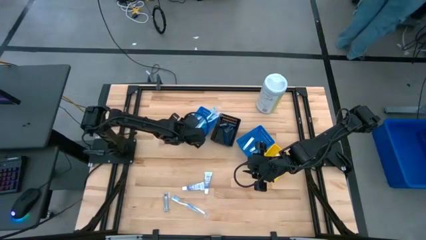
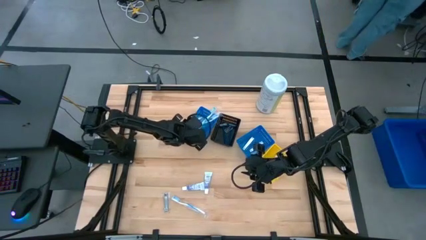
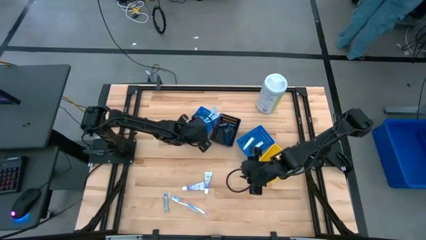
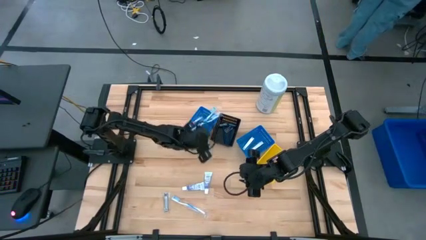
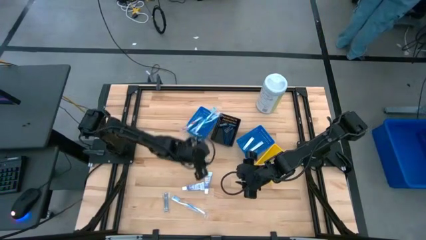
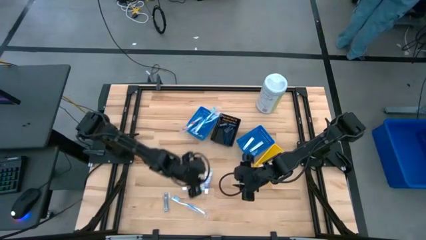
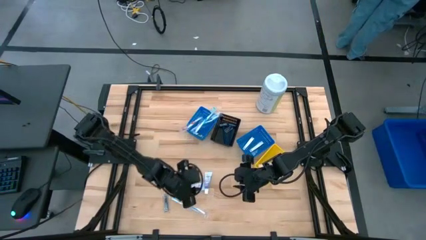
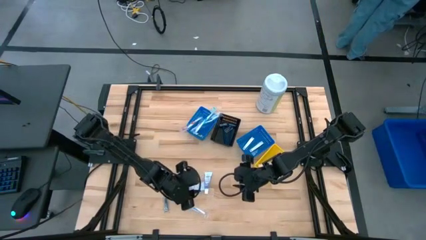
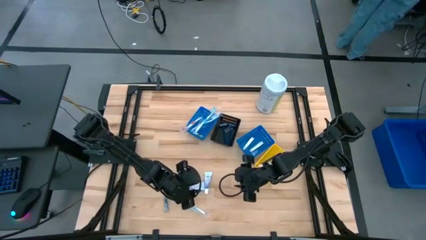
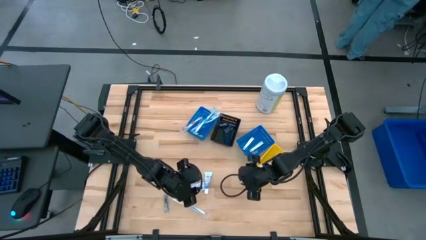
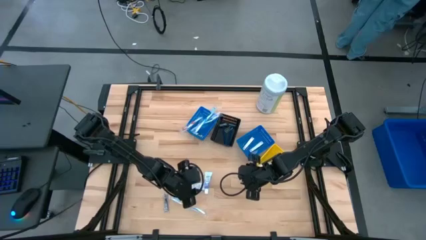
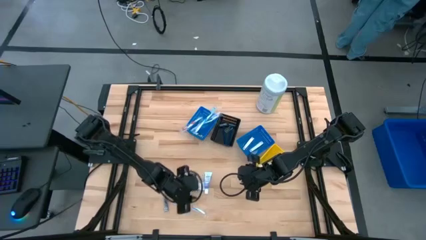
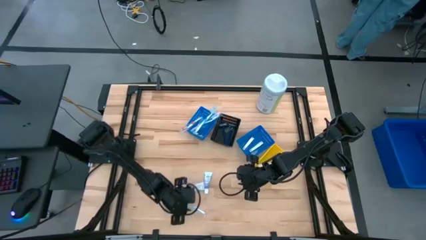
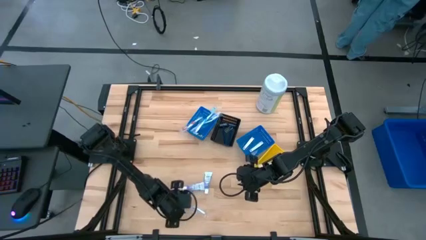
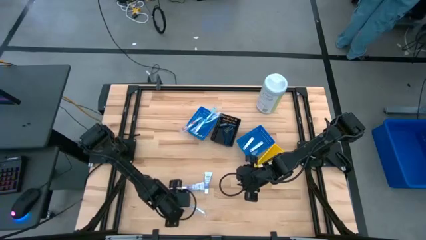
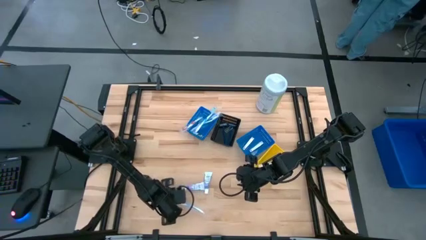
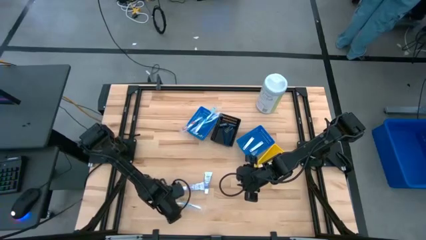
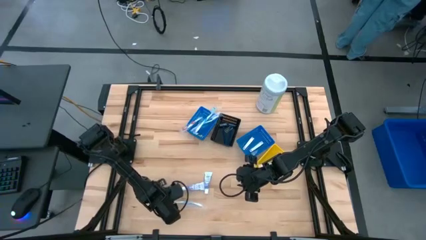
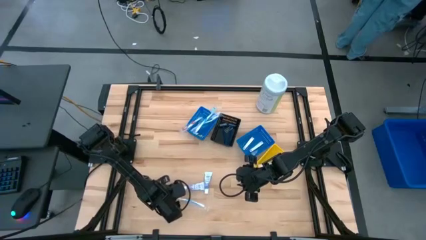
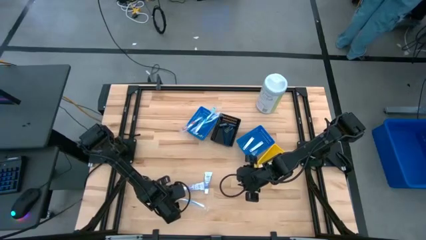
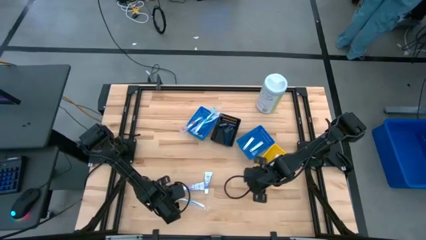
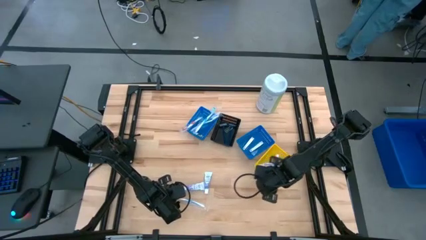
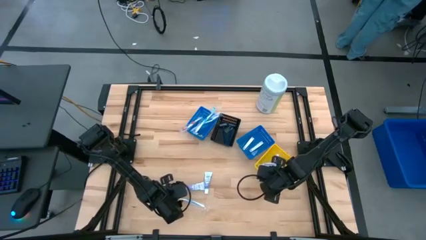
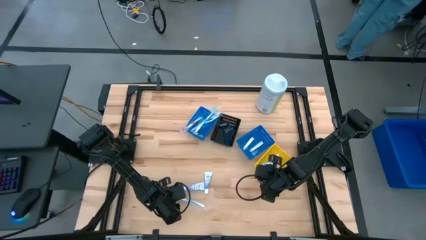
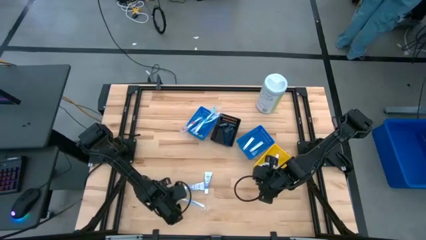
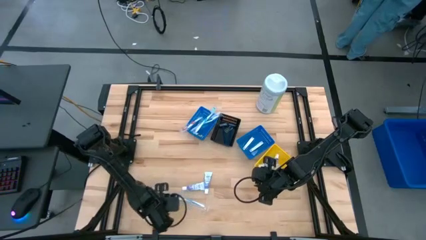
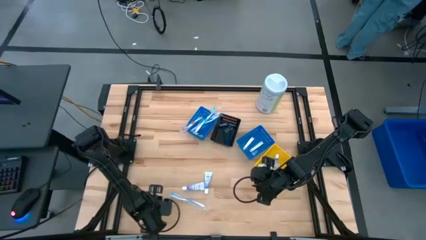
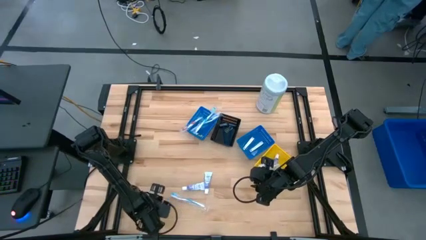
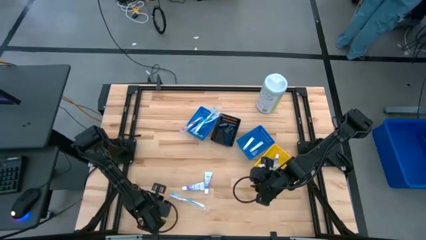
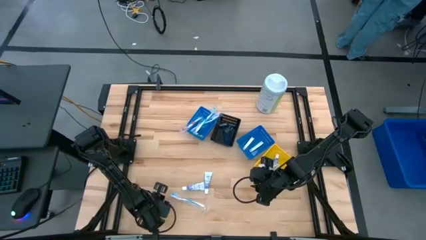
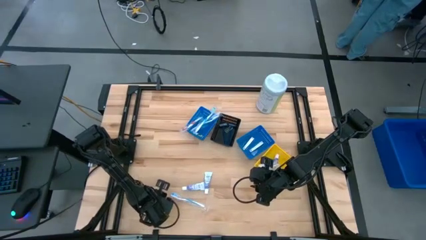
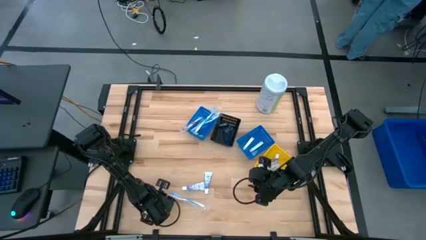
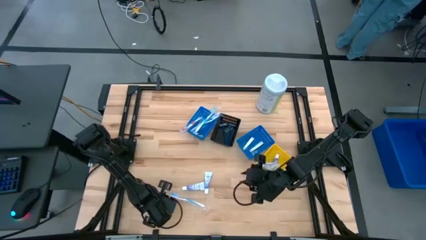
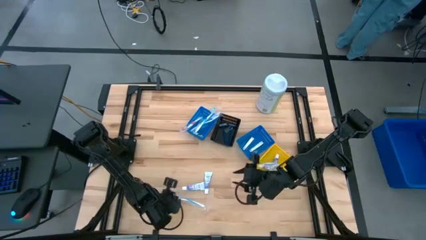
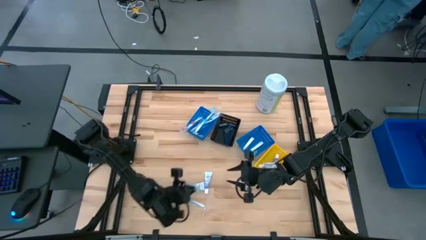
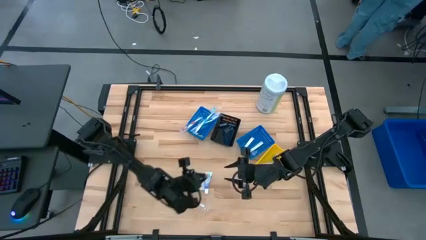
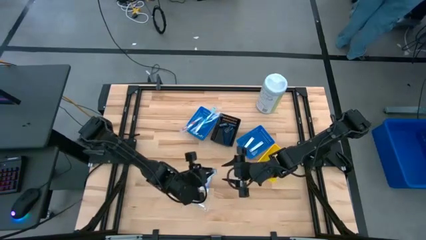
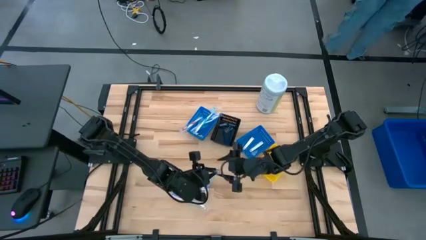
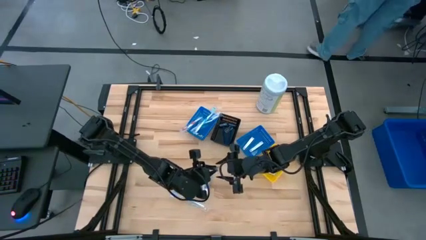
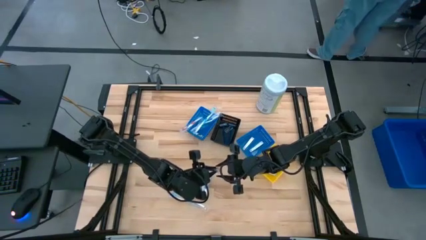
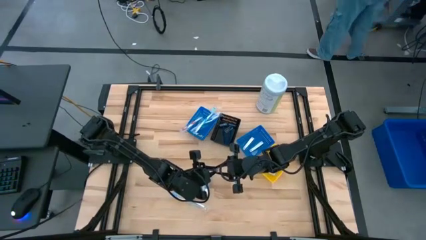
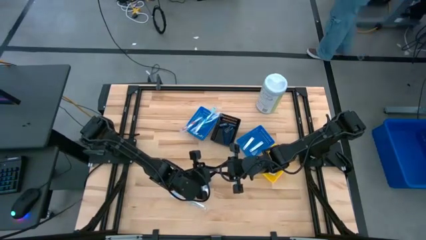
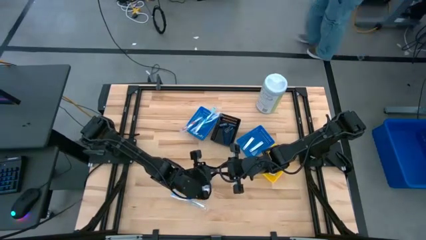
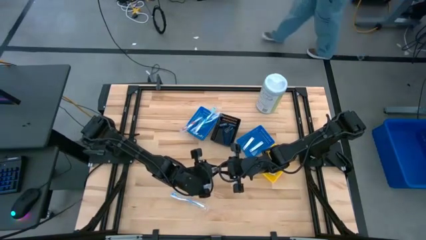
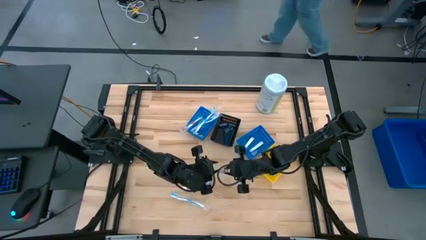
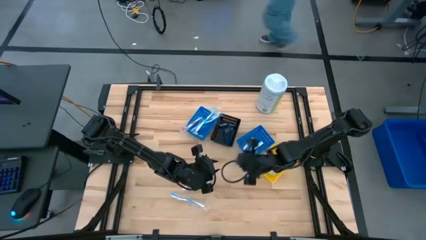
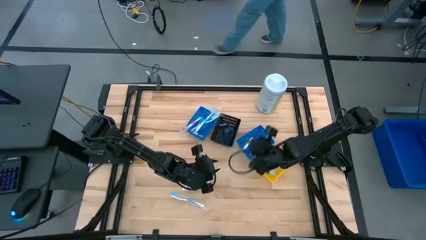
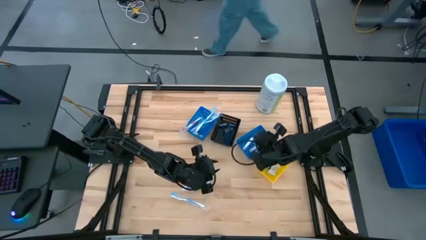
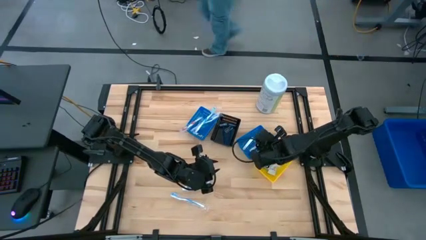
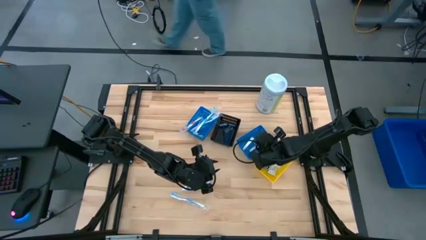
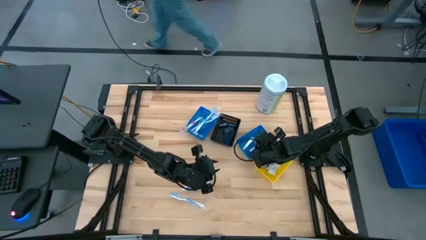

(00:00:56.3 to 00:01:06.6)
Task: Pick & Place Travel size toiletries
Put the nail cutter into the right blue basket

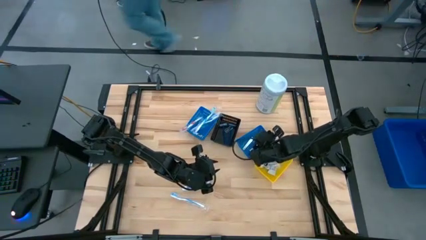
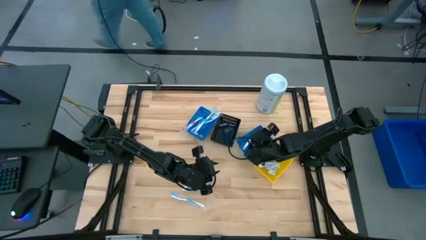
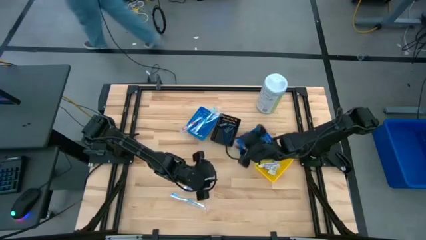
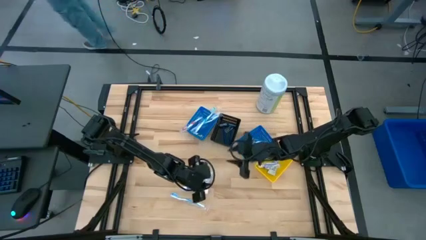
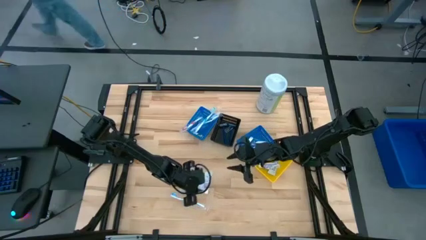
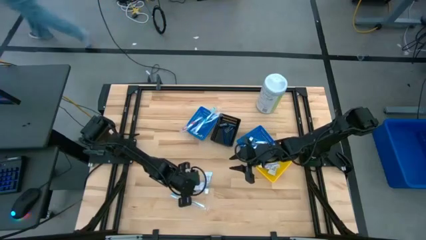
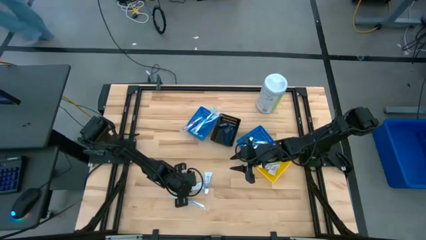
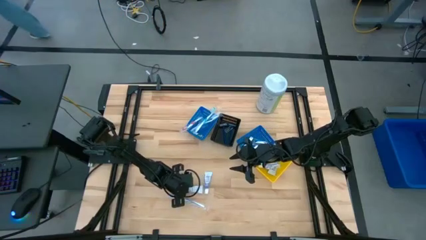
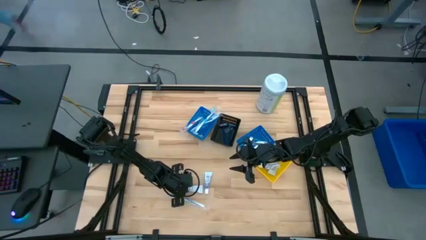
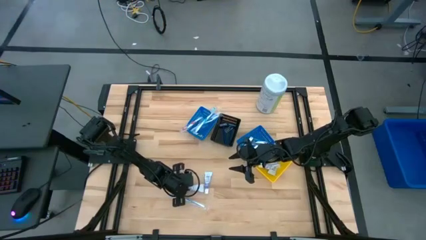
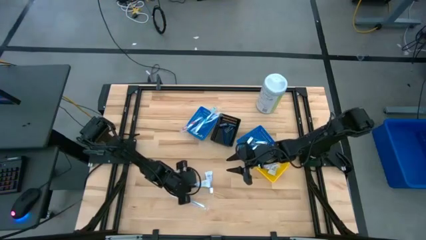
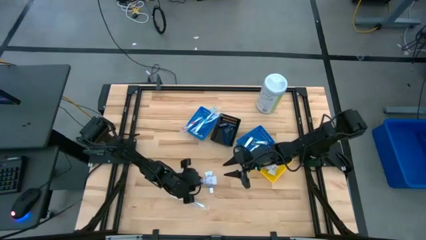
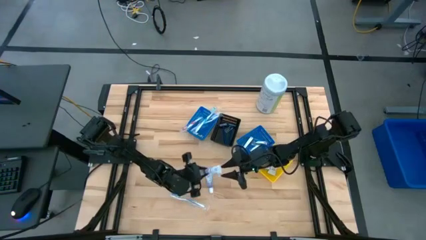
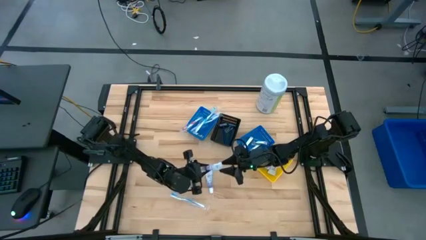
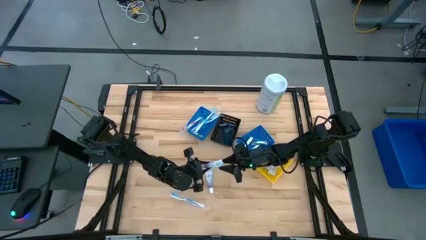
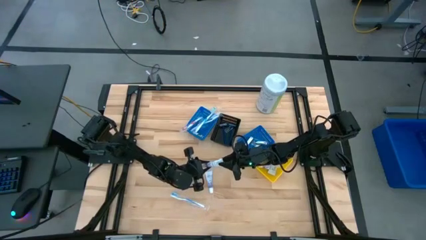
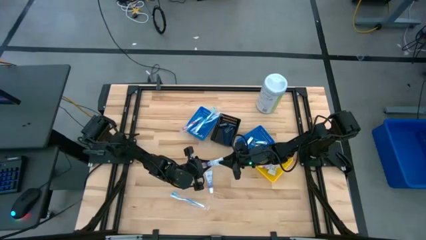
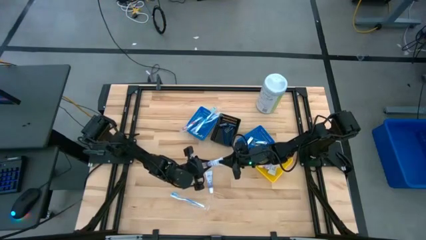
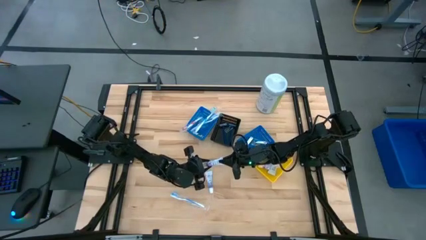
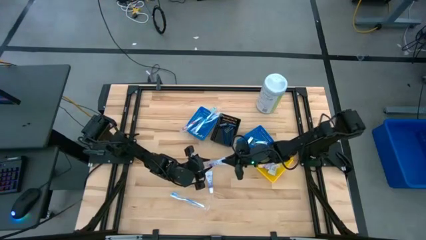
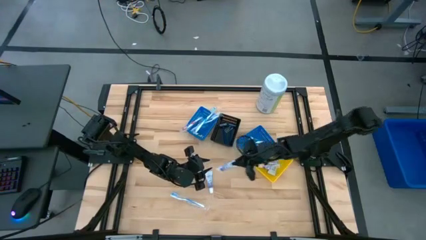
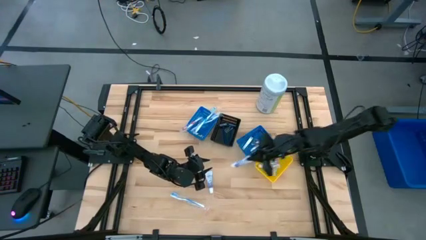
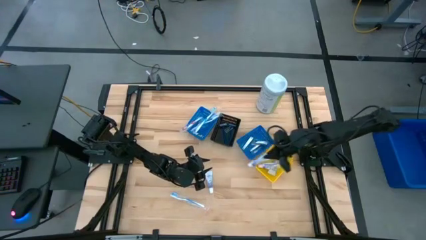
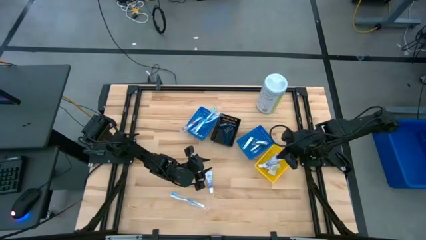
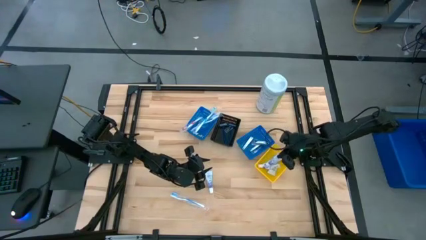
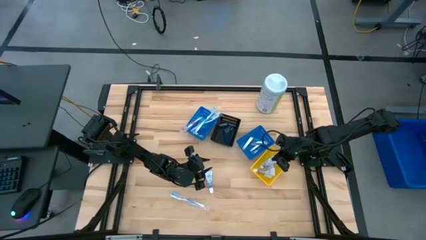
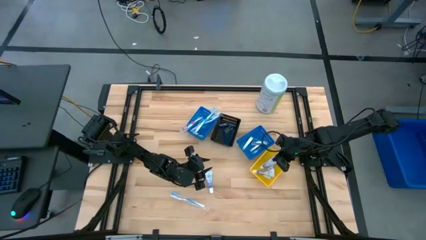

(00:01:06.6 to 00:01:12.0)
Put the left toothpaste into the yellow basket

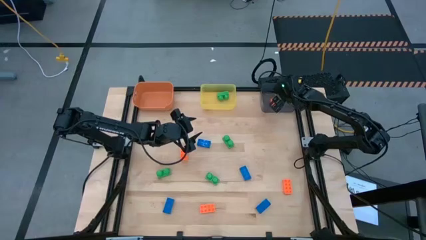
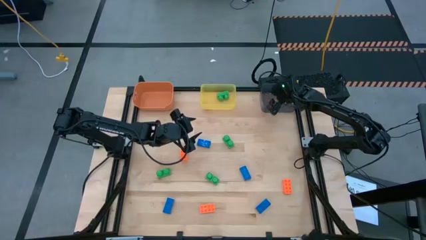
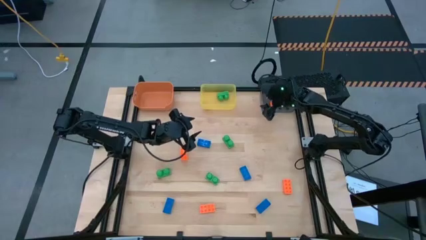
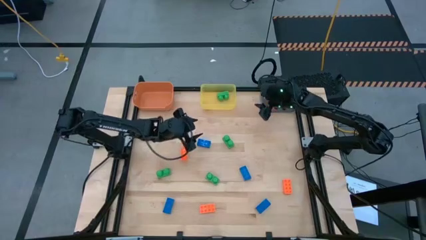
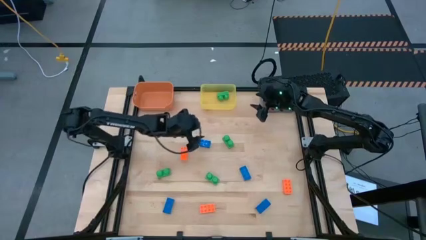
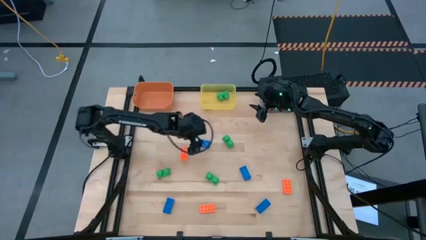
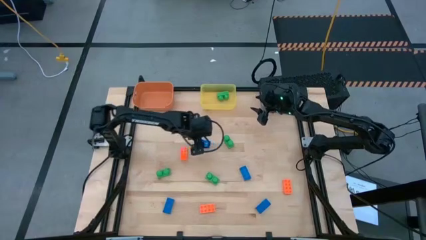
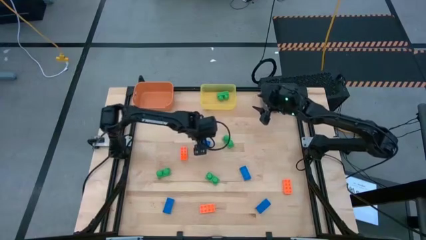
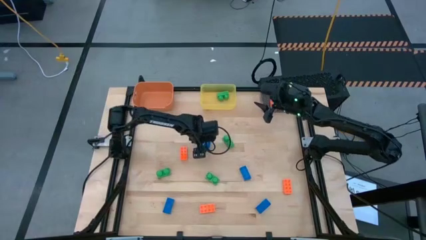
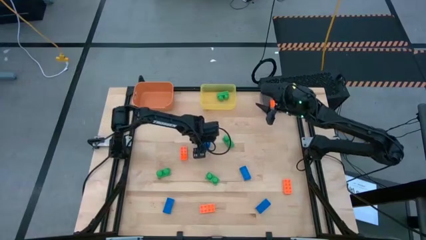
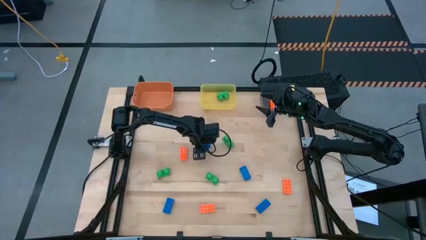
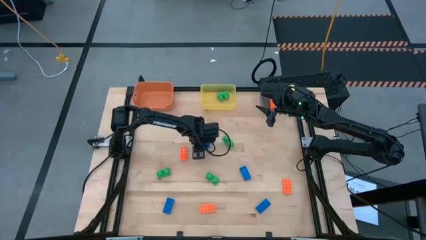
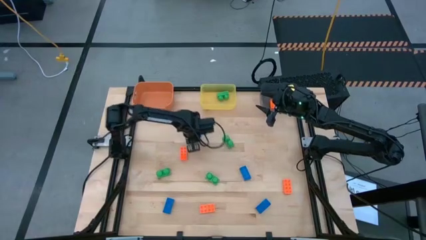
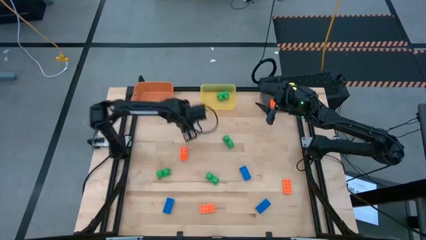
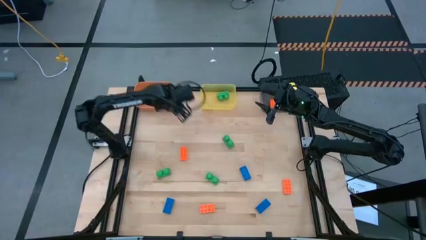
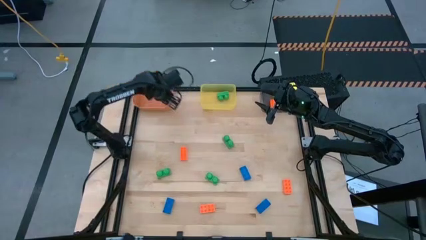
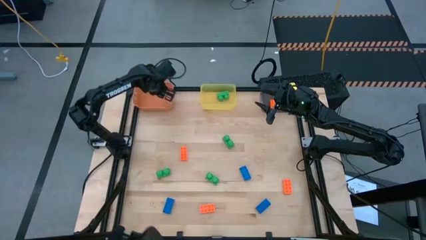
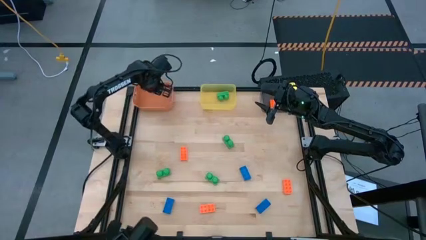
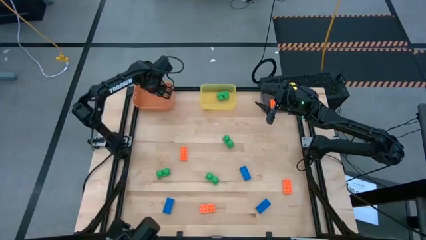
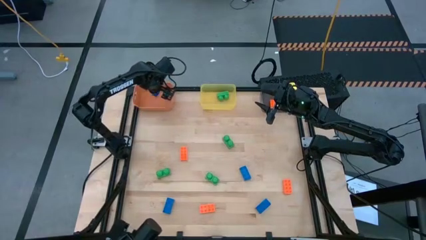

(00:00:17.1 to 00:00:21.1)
Task: Sort & place blocks by color
Put the blue game piece into the orange bin
